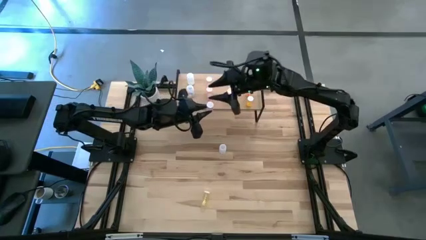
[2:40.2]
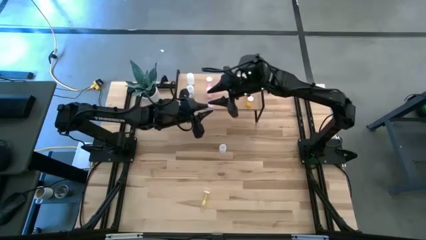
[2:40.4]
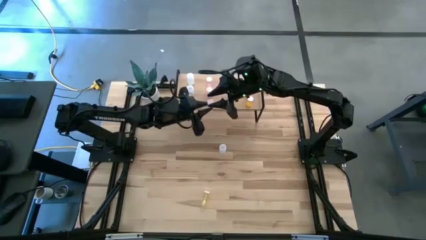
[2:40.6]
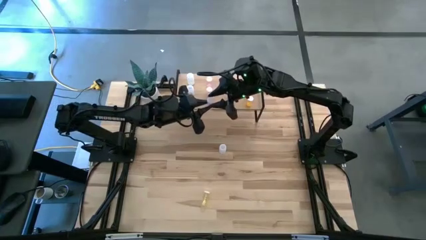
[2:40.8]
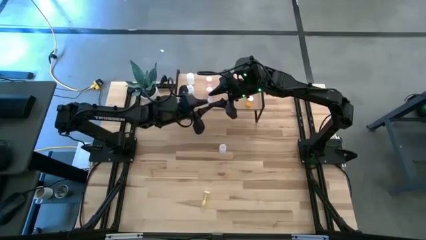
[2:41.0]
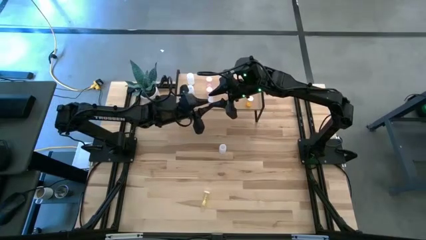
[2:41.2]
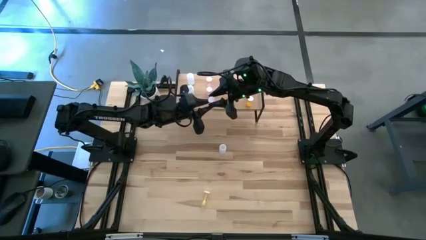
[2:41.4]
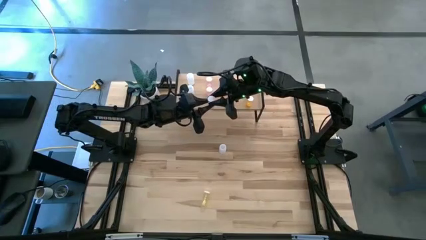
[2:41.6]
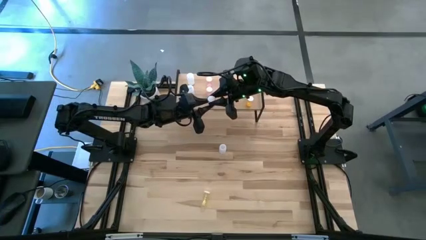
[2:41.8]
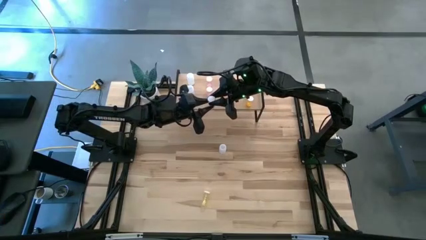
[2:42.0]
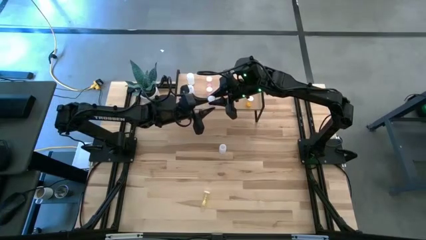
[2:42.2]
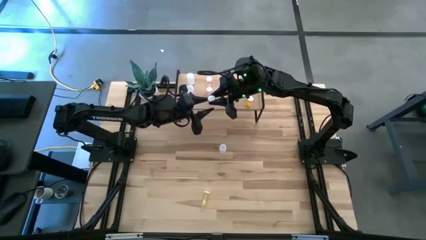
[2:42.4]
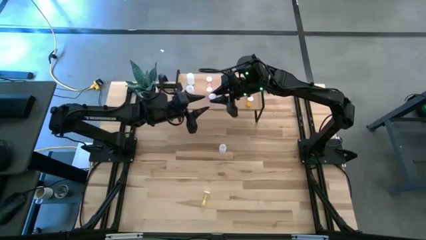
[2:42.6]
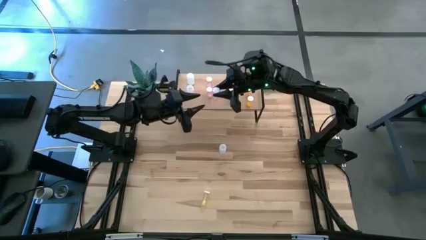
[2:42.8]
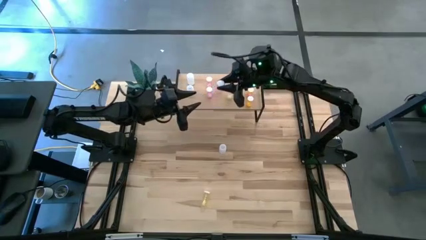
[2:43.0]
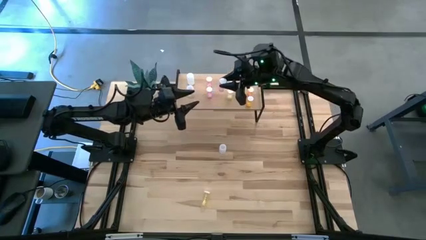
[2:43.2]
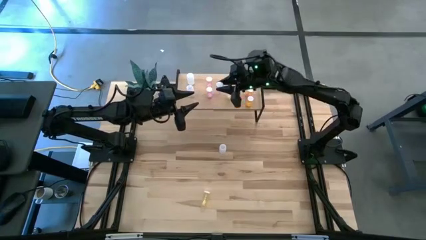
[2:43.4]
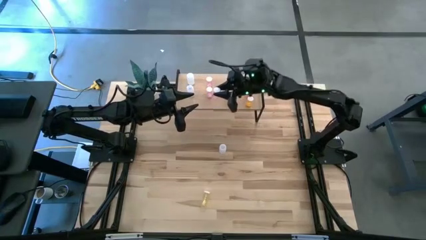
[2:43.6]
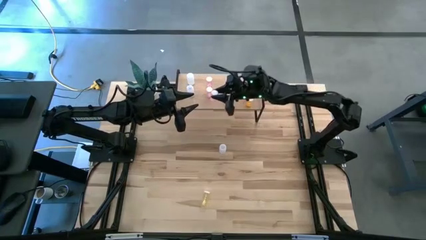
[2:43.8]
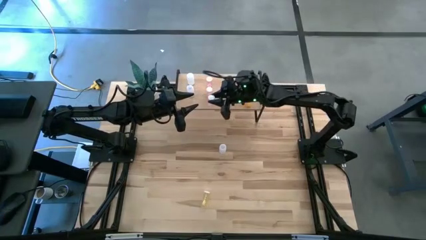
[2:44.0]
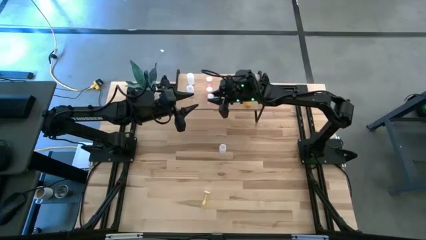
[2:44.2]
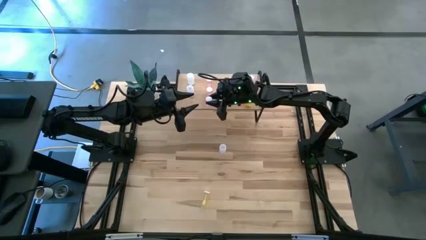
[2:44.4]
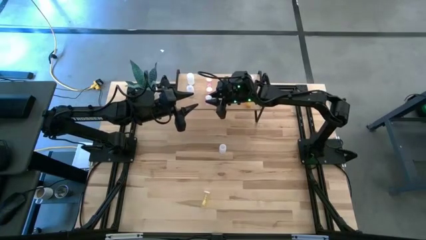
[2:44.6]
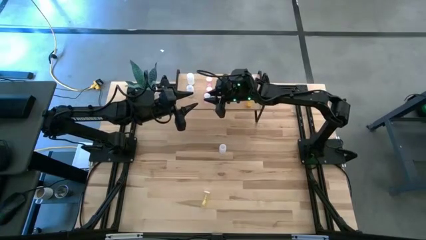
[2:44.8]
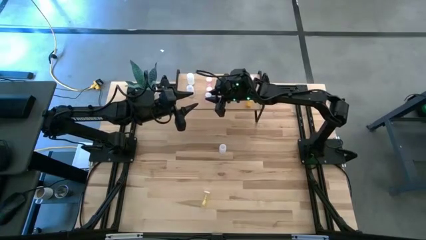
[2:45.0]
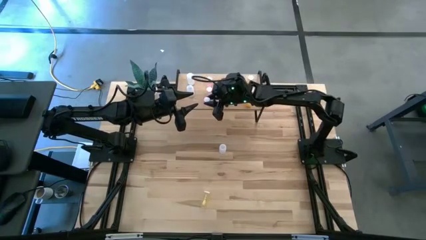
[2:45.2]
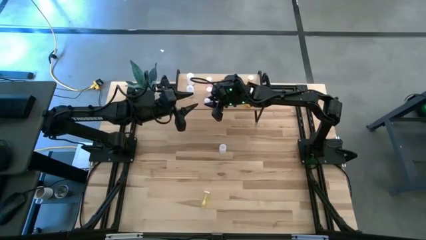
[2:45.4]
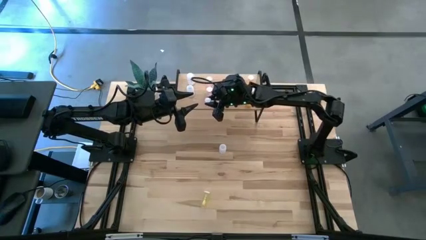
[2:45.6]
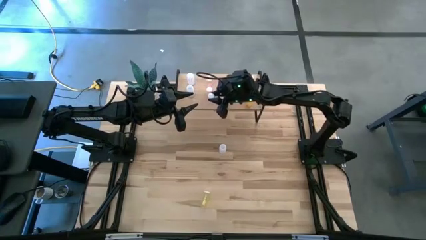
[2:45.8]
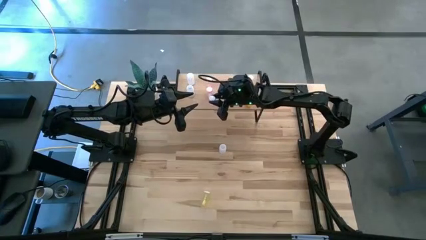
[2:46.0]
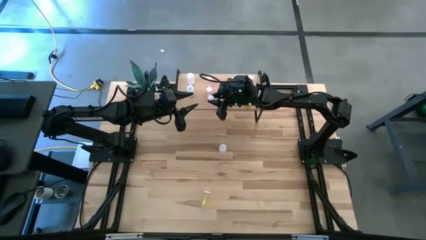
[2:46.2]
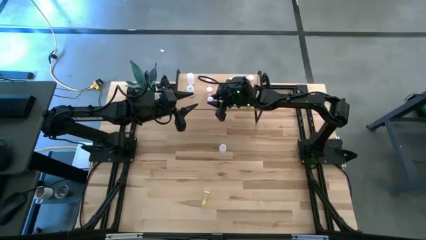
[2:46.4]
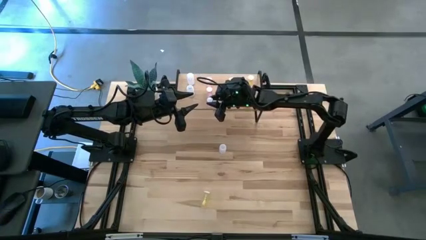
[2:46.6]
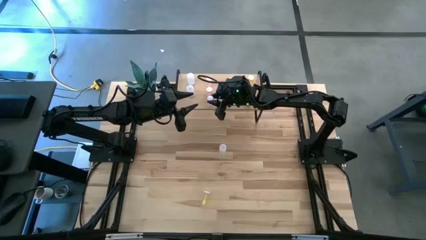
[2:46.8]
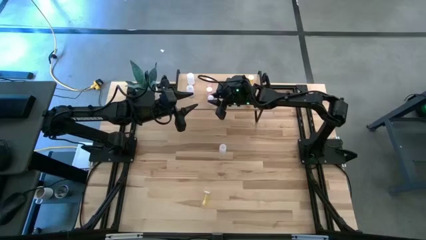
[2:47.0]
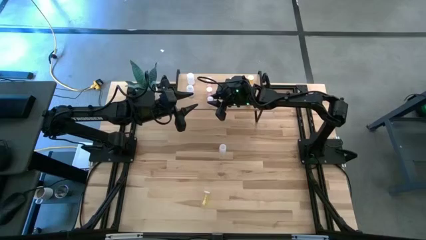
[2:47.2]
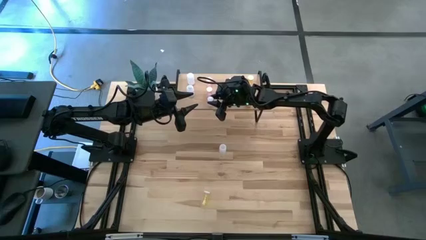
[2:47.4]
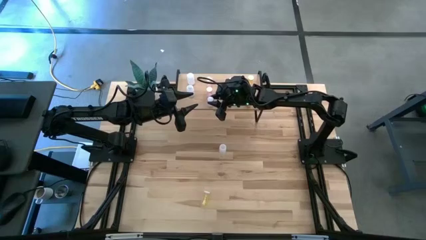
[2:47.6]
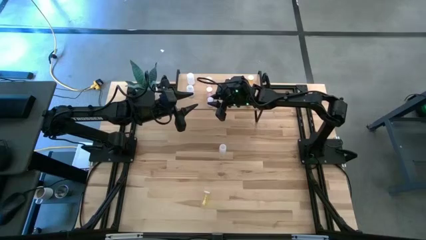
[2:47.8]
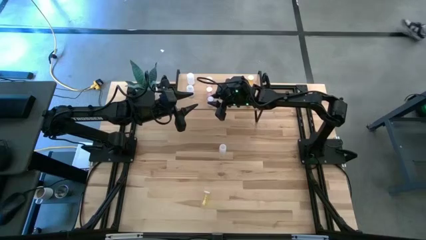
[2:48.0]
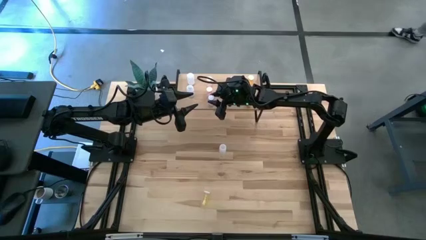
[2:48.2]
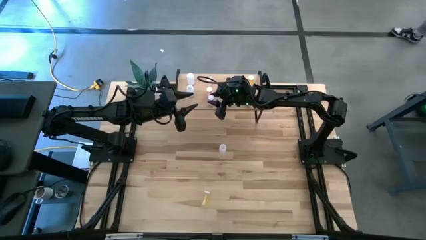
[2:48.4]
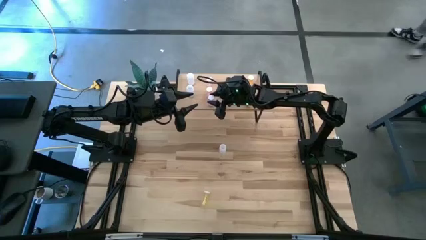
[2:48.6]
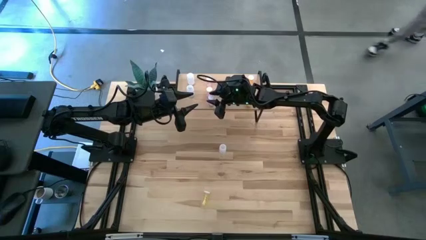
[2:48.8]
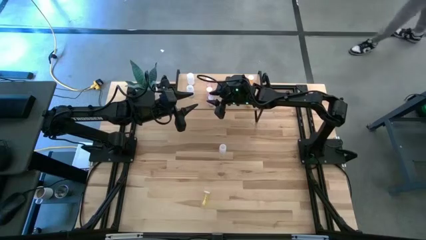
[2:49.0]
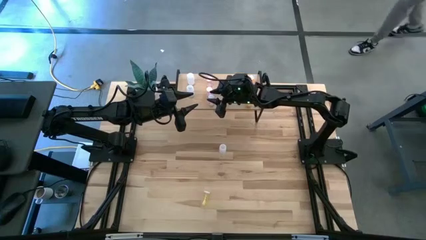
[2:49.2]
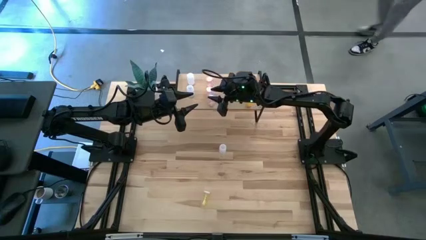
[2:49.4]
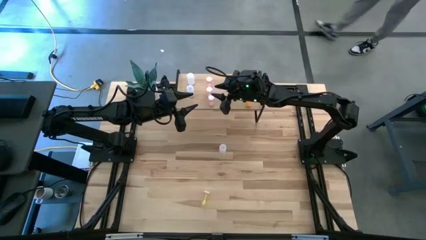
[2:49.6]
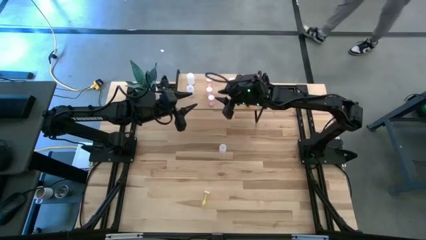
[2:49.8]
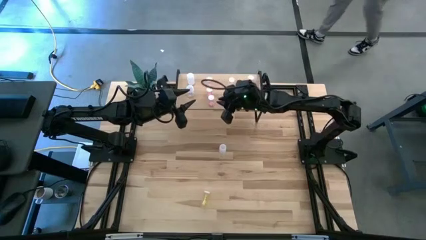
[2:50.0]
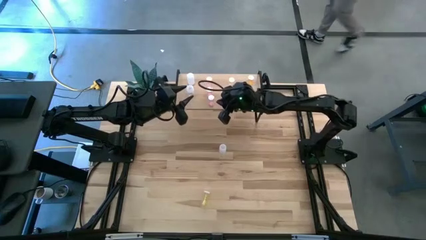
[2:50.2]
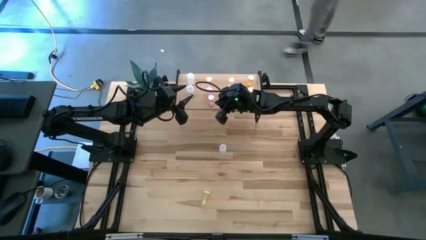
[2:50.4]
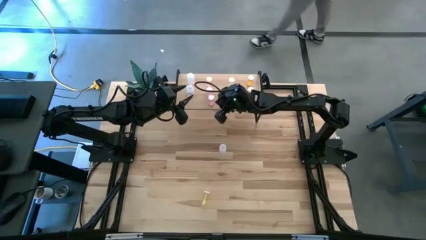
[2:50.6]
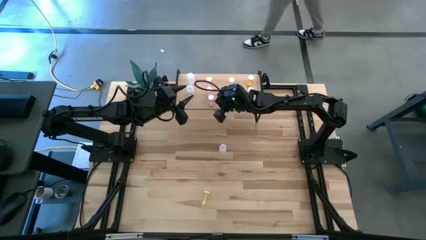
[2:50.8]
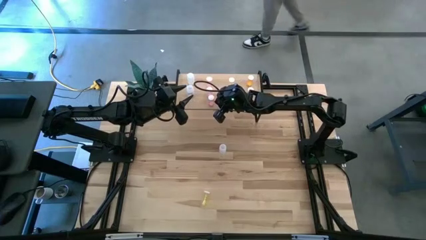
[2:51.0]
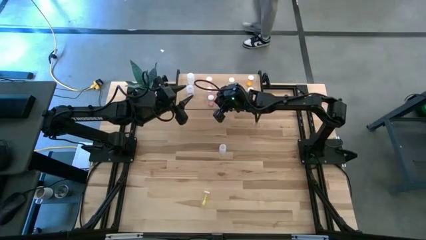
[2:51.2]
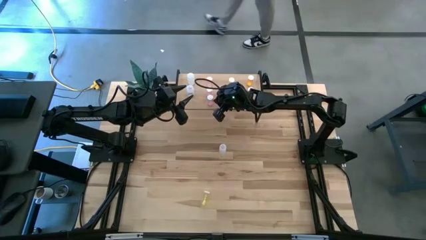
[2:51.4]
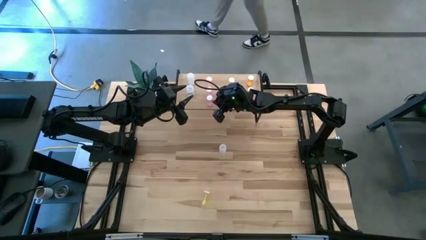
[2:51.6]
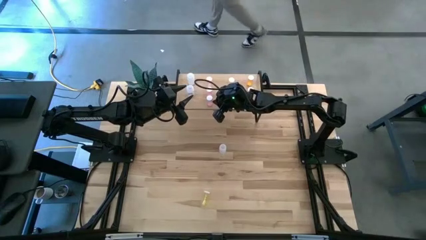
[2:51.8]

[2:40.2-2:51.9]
Task: Pick and place medicine bottles onto shelf by color
Put the pink pill bottle aligned with the other pink pill bottles on the shelf
